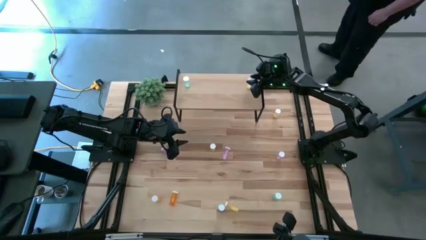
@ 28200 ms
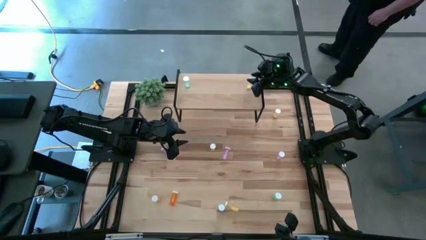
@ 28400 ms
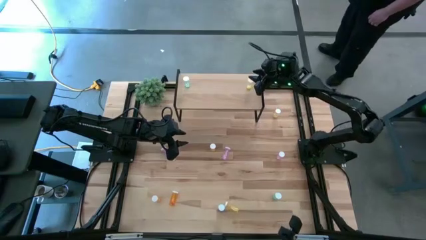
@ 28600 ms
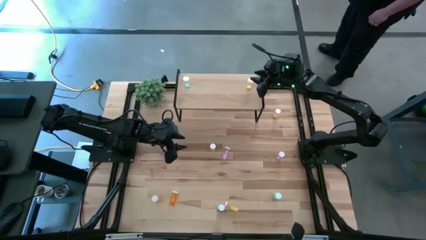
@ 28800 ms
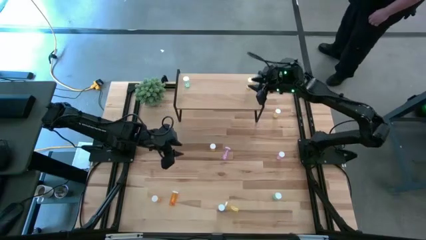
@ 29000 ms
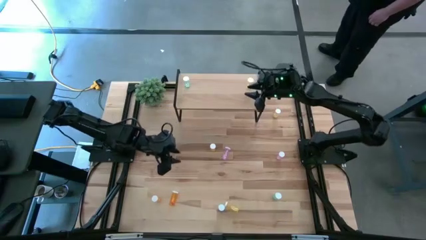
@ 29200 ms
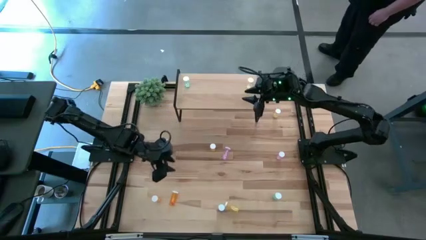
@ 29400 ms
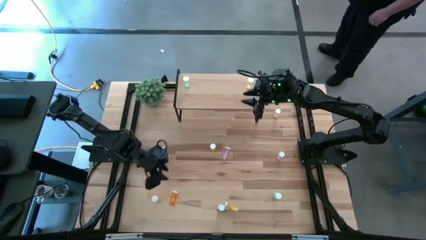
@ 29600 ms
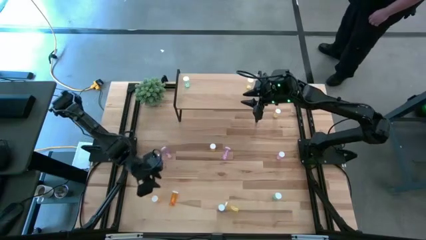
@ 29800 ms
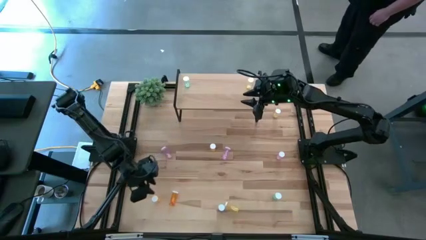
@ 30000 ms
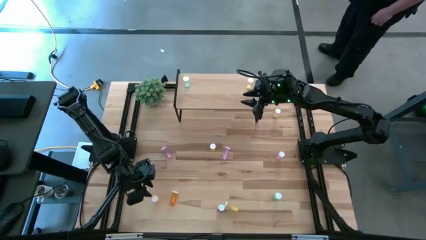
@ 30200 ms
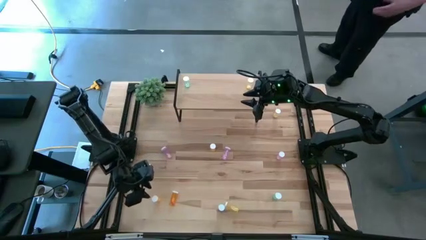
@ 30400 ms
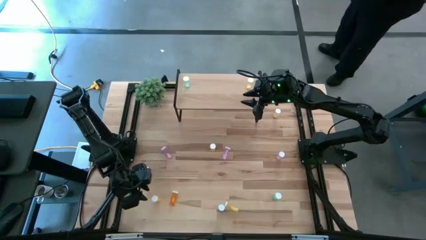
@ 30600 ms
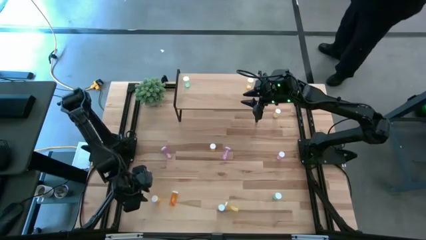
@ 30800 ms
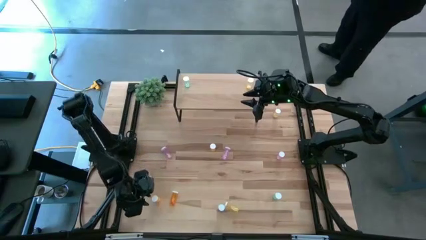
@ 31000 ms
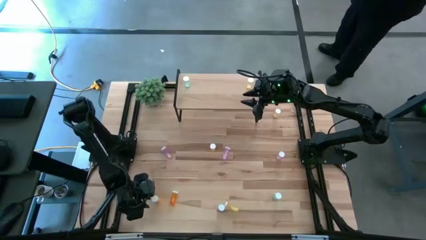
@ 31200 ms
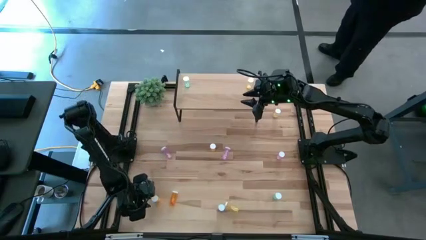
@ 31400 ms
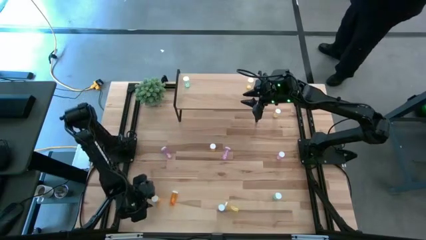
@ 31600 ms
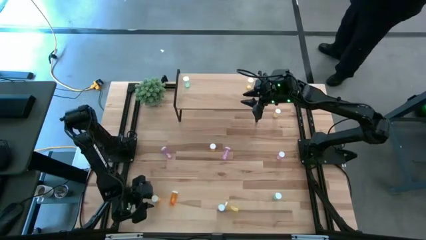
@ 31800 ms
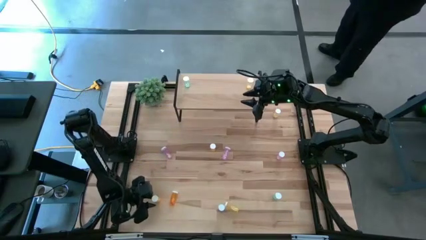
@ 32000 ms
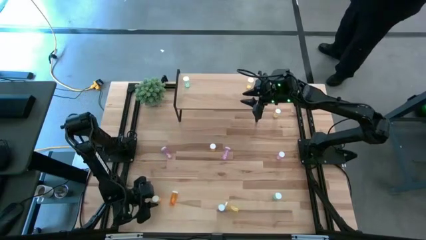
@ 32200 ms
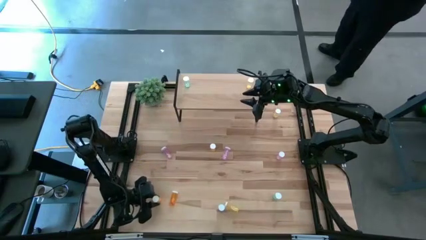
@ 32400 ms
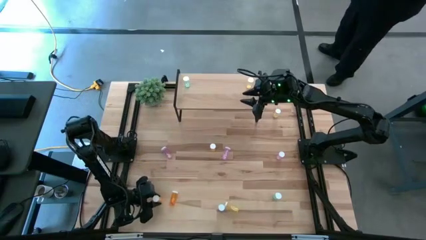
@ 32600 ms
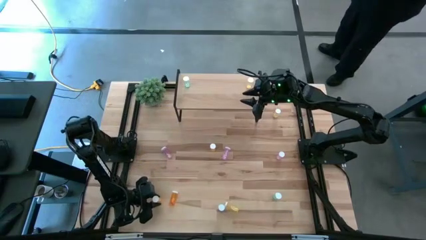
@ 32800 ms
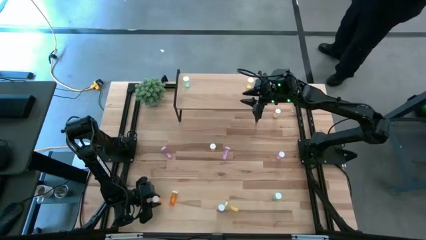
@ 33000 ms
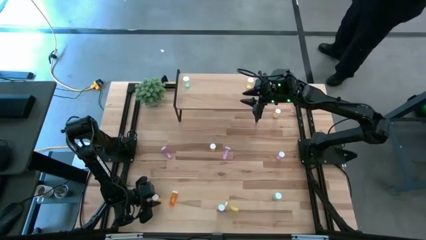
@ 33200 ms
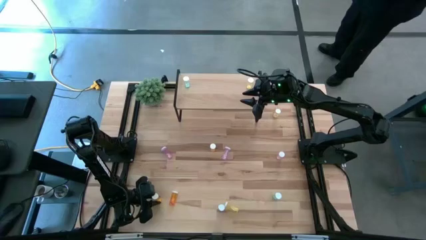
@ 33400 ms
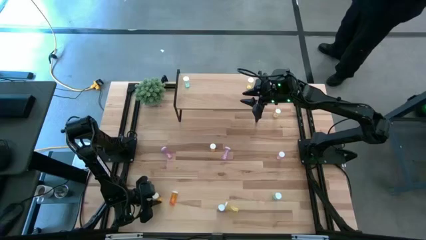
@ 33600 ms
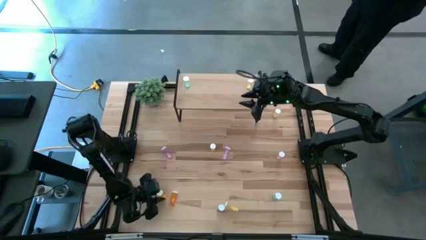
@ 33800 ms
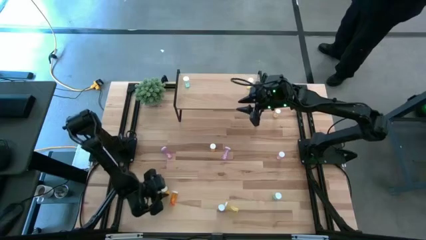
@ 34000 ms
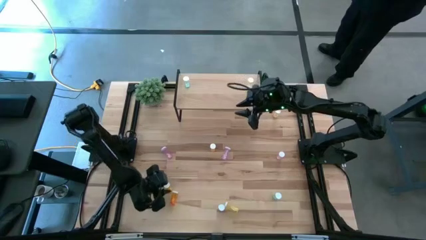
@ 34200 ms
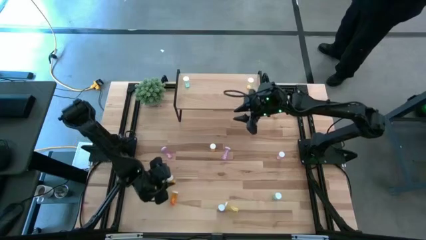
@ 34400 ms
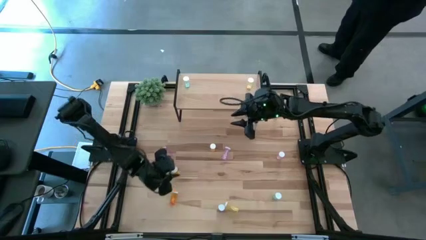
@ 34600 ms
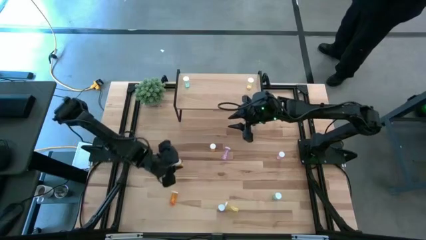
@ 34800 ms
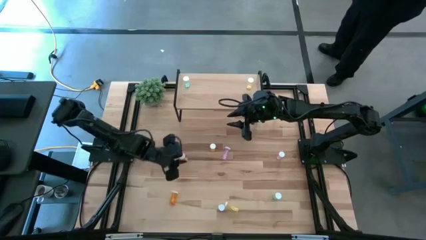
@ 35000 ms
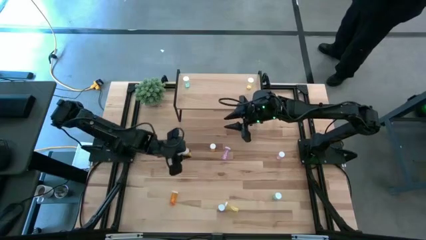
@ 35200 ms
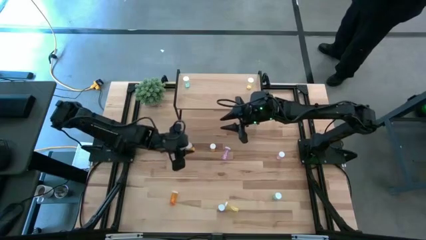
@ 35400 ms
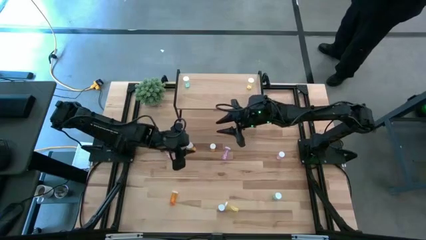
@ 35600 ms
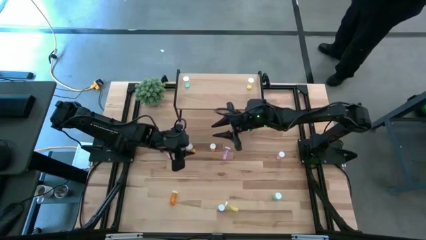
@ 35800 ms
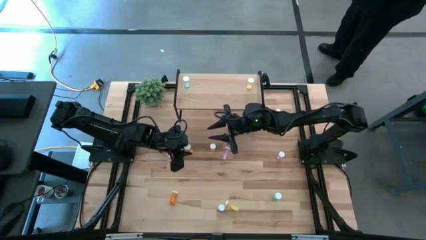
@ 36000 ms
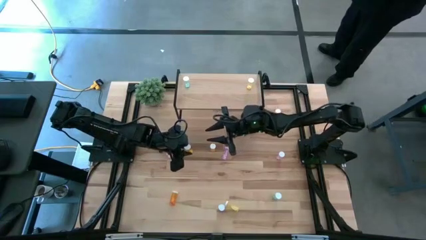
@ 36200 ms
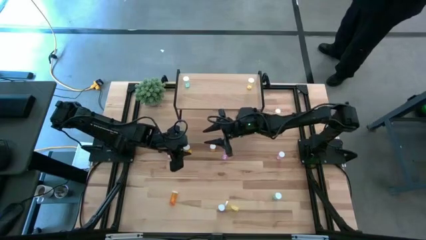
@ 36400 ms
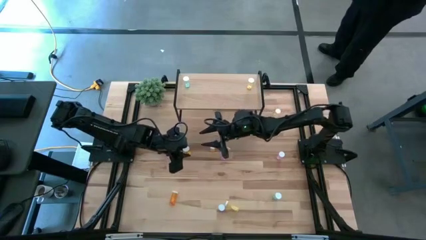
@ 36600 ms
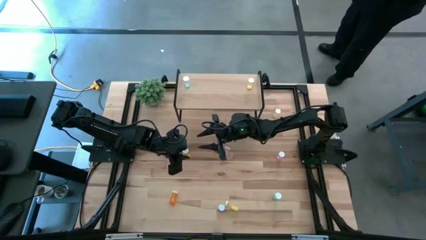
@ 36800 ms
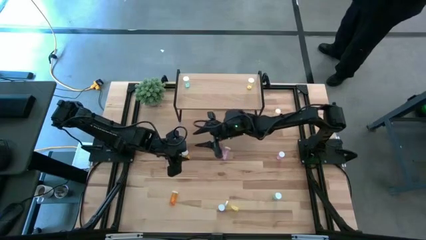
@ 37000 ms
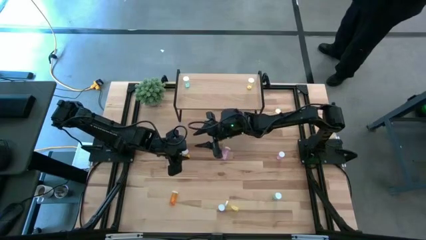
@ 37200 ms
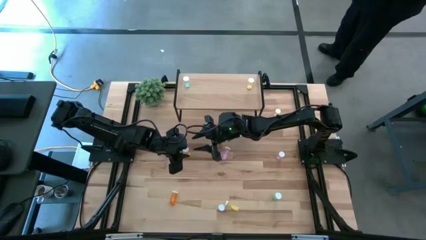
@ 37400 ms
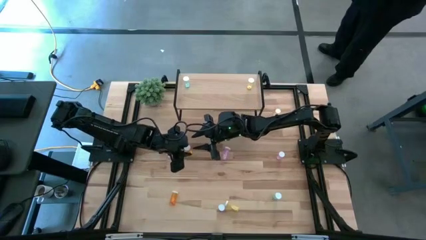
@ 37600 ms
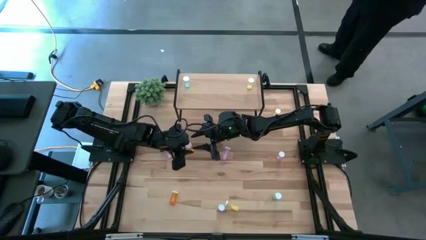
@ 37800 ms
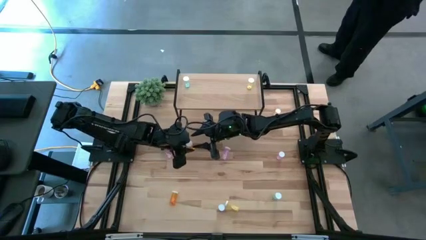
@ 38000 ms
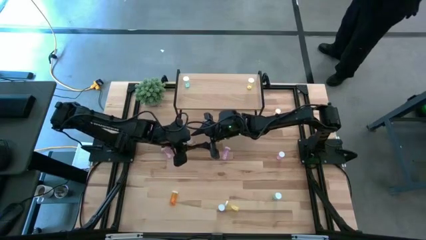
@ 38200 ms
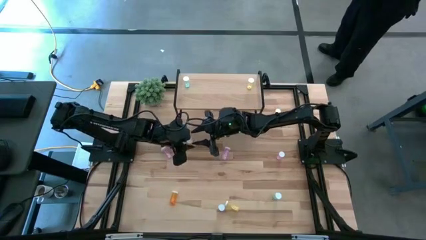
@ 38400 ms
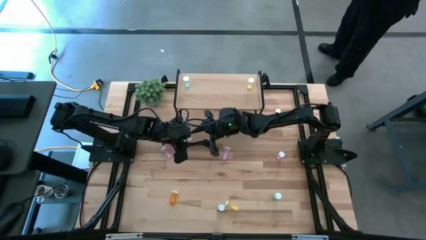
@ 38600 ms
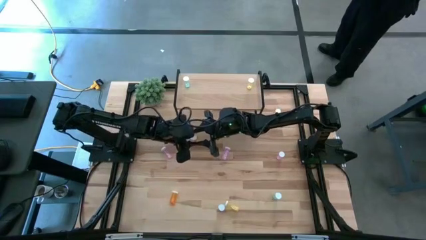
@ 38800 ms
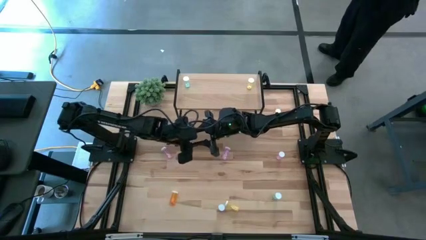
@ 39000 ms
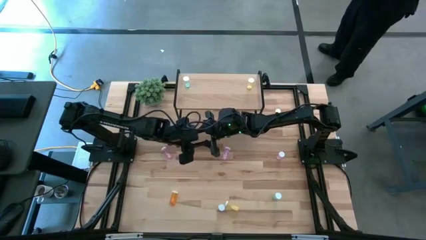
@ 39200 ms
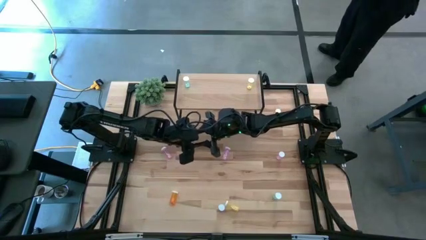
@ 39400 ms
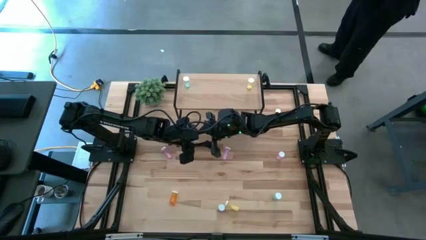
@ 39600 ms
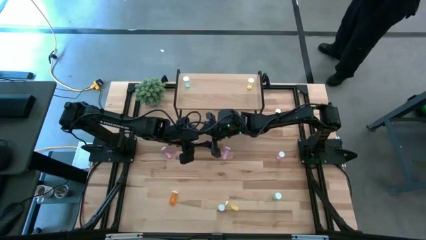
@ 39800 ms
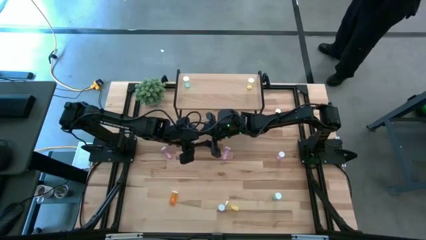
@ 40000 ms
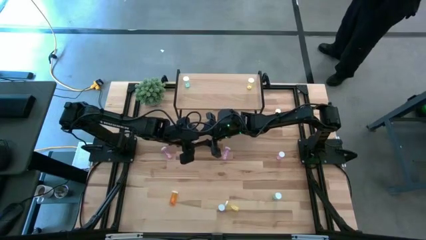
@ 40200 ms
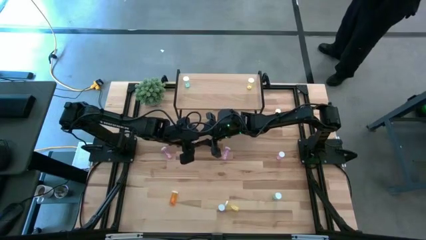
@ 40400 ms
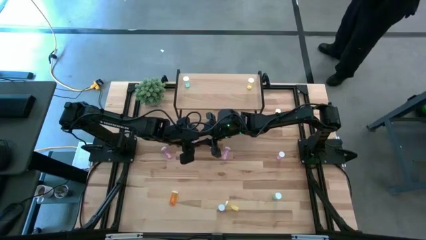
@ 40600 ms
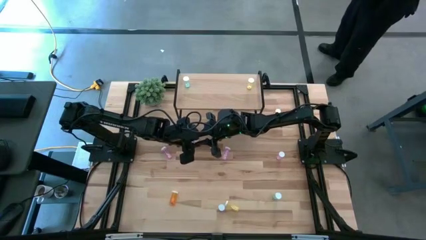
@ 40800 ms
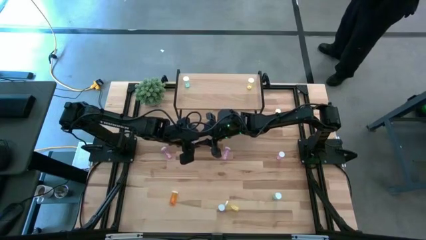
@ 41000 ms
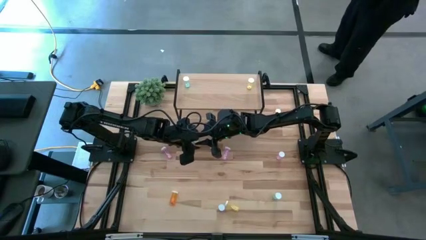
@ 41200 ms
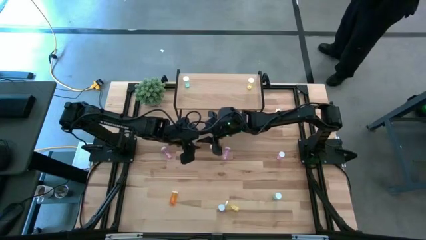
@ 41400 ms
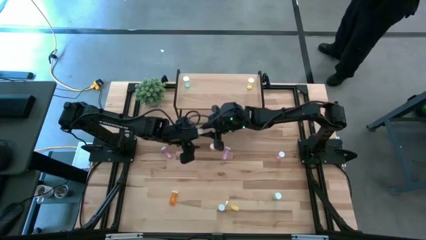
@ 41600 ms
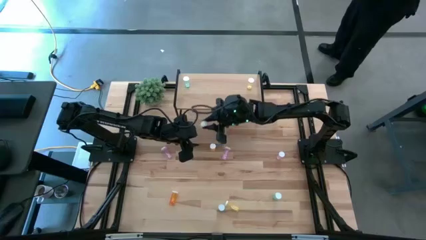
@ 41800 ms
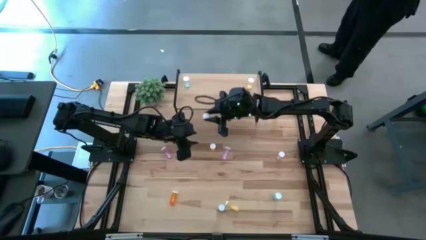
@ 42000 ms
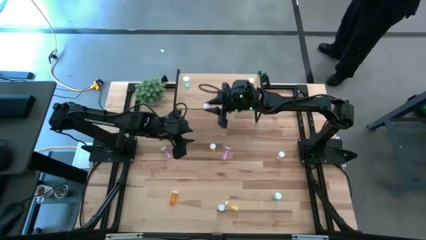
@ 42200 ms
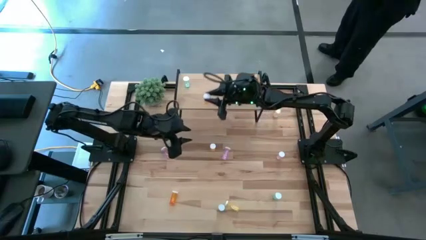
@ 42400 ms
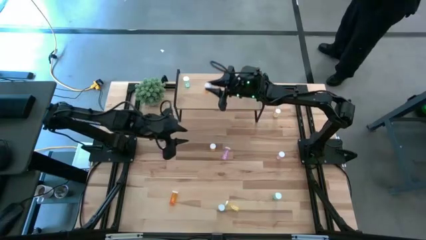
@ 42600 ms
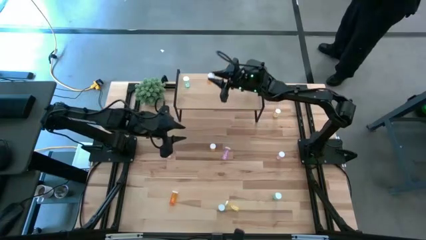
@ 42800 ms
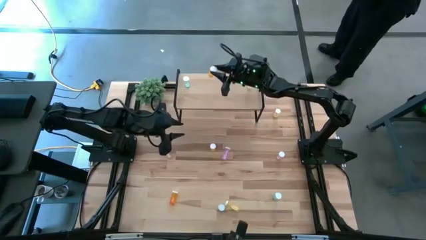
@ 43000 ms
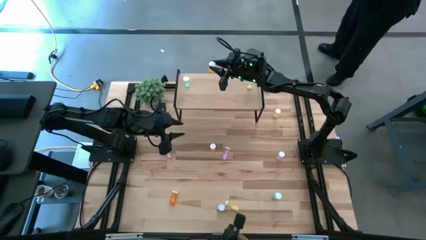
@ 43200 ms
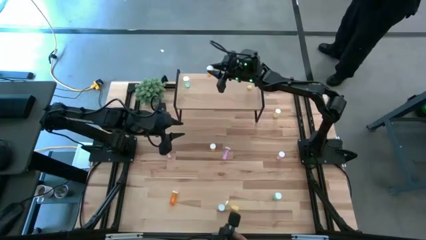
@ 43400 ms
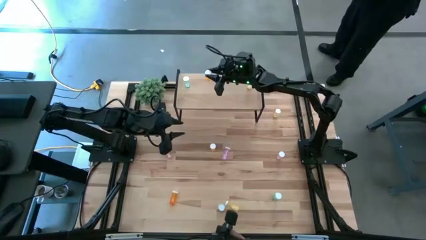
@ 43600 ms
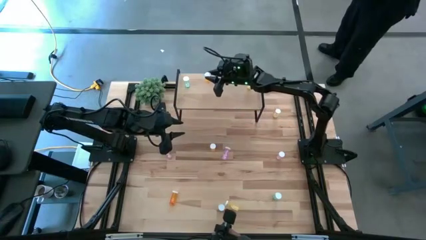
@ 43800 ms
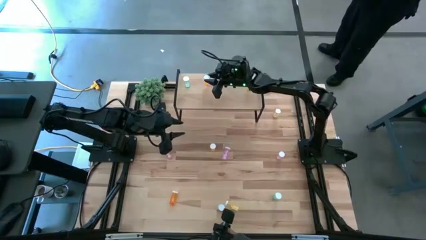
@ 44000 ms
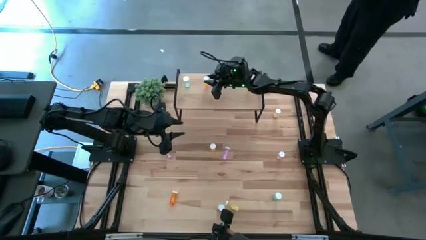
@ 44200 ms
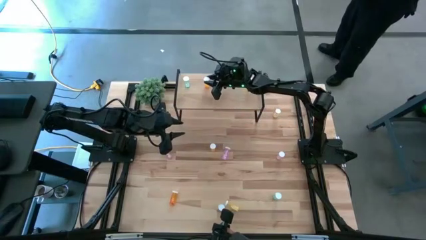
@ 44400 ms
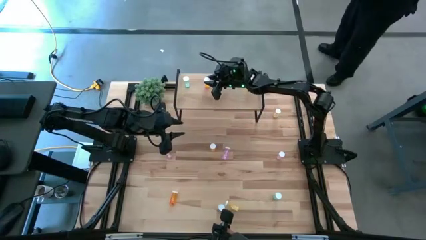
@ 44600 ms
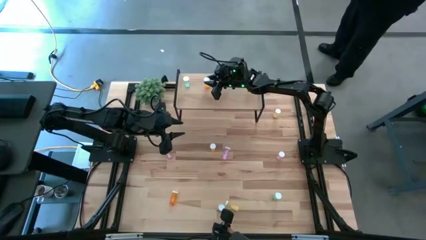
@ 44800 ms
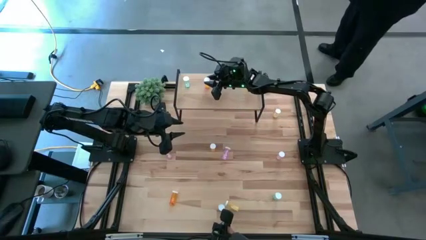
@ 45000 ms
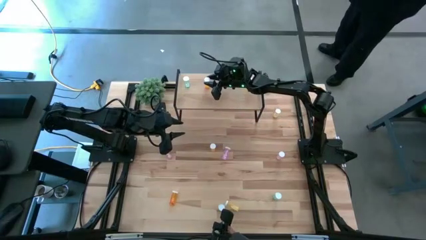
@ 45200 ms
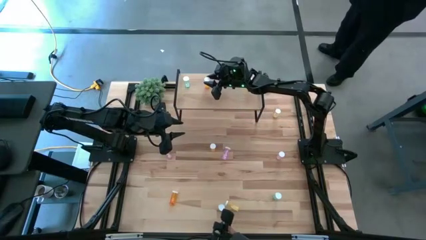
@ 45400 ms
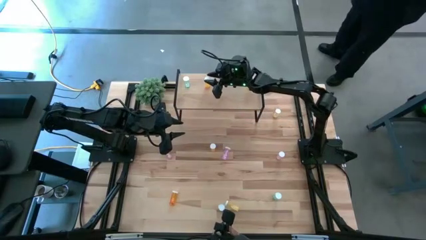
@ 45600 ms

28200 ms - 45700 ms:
Task: Pick and place medicine bottles onto shelf by color
Put the bottom left orange pill bottle on the shelf
